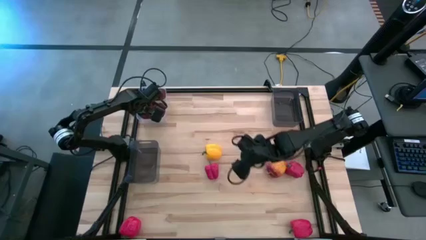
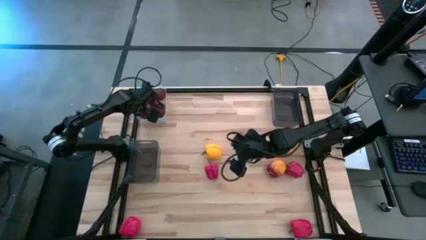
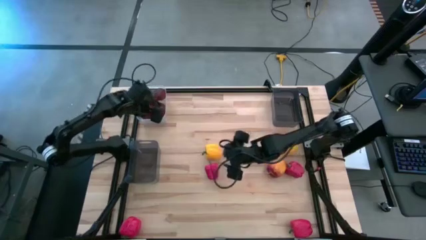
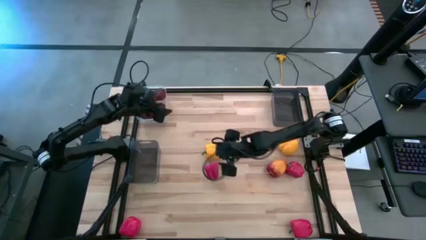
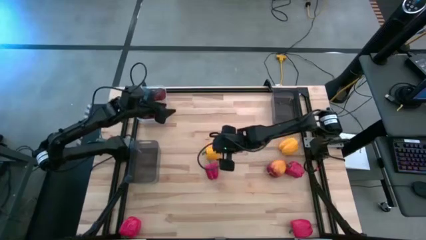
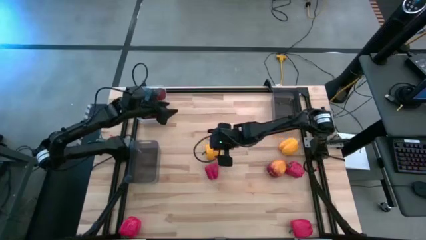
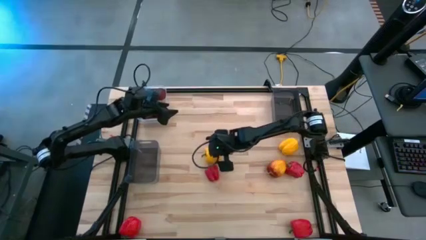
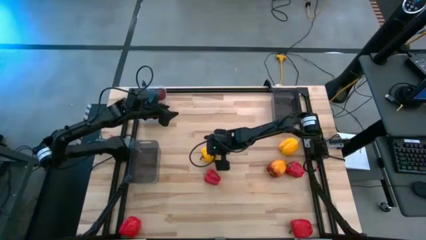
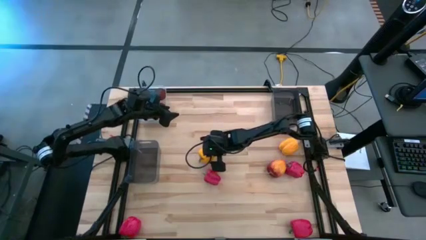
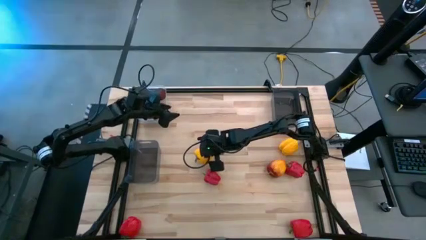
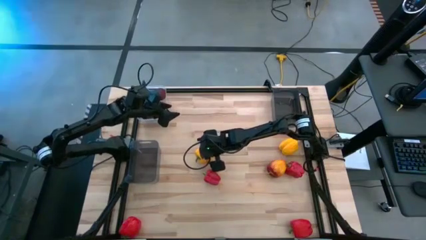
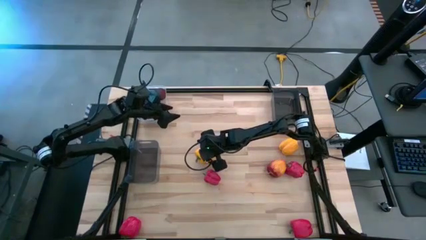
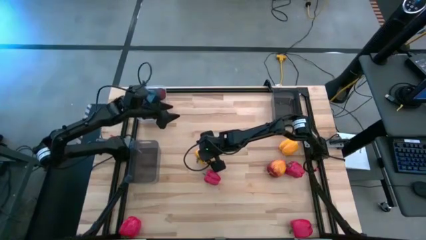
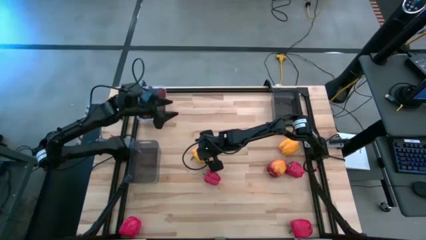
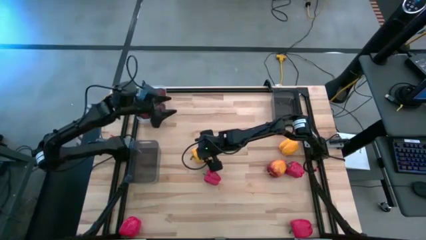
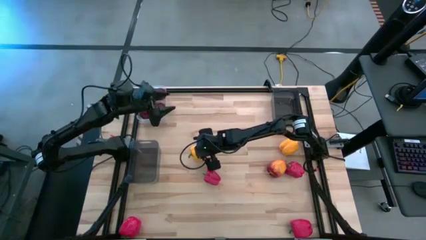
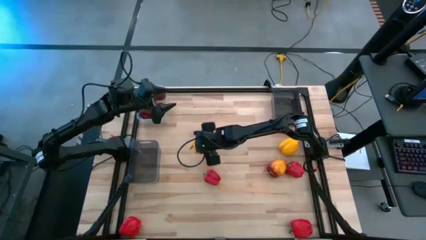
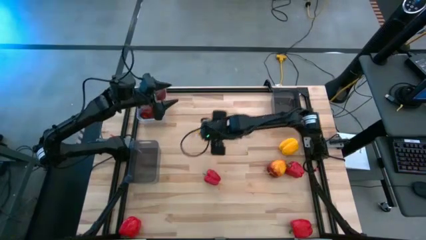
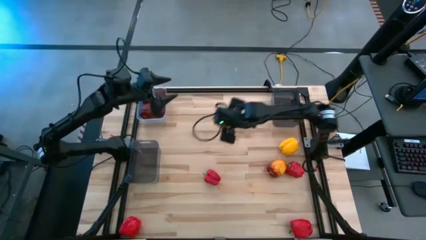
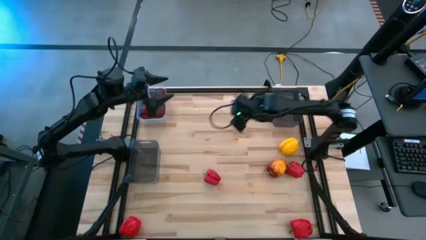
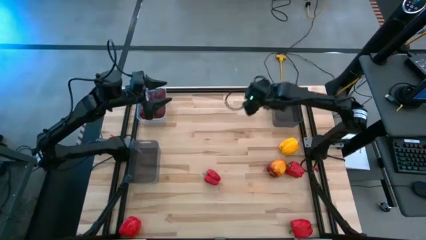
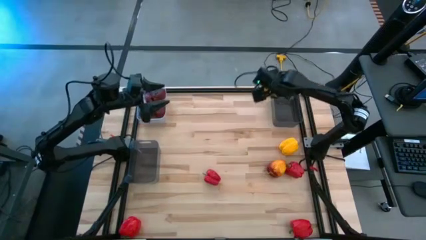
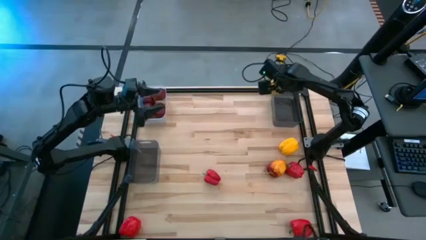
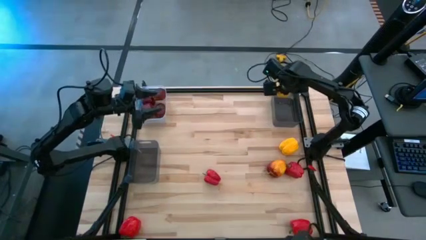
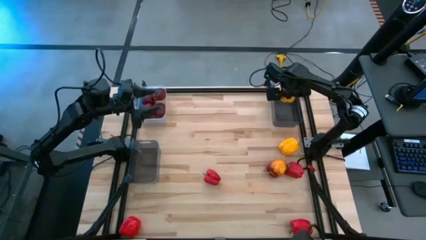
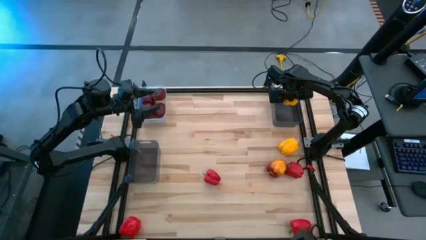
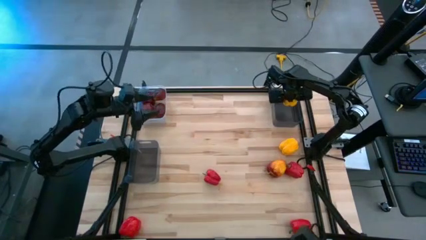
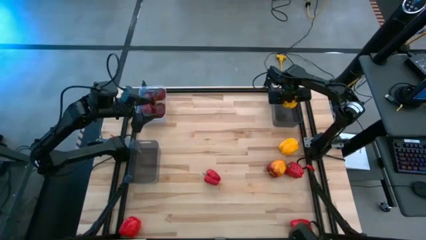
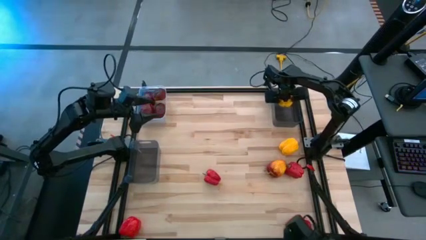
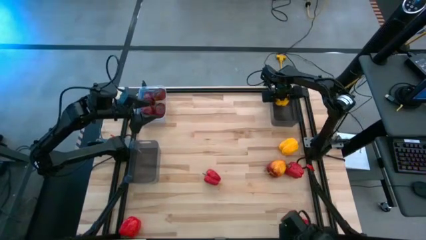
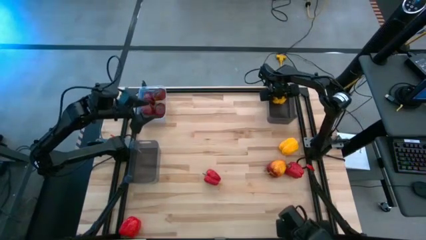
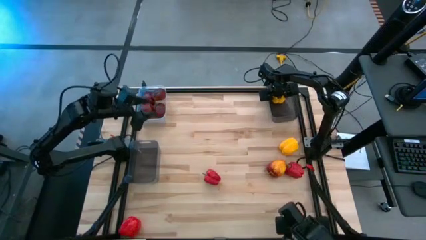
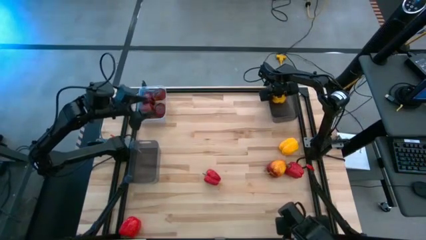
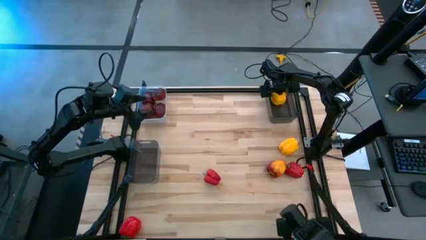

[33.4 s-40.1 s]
Task: Sort produce into baskets
Put the yellow bell pepper into the top black bin

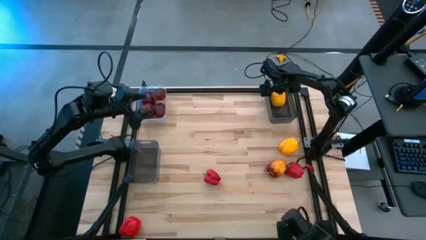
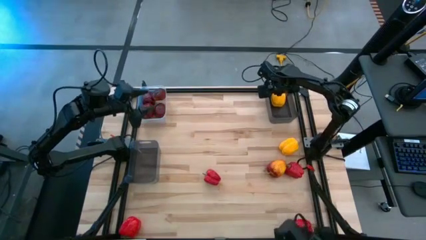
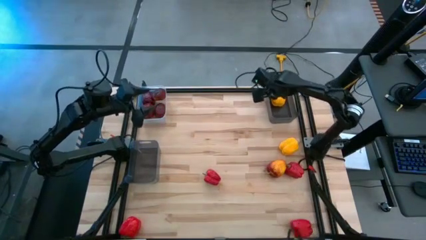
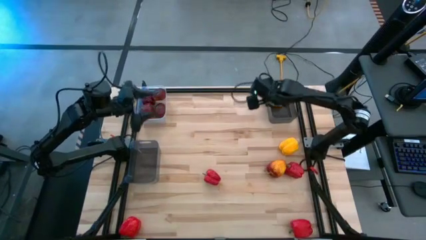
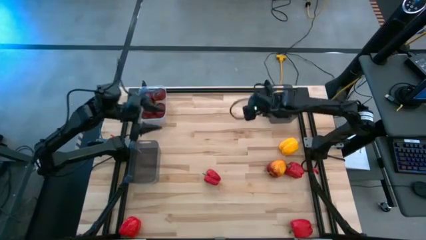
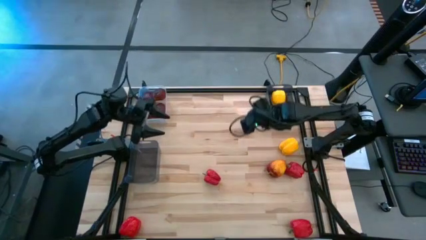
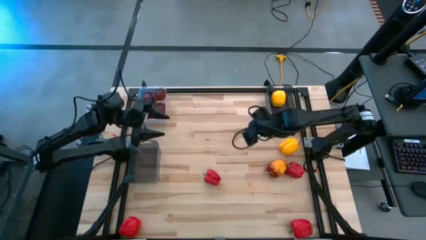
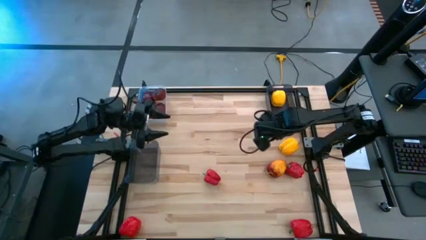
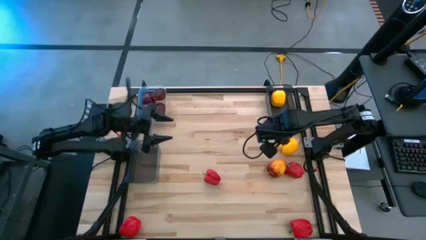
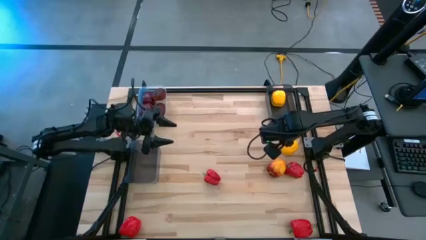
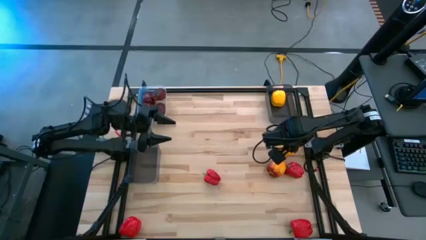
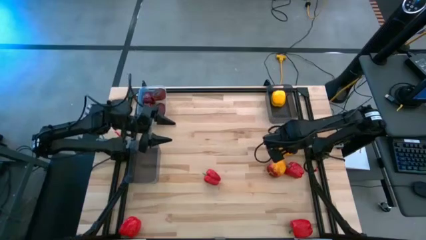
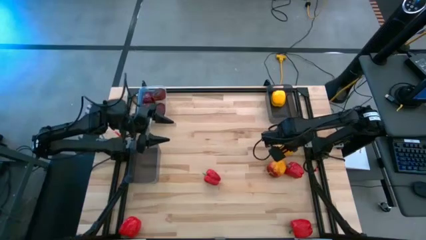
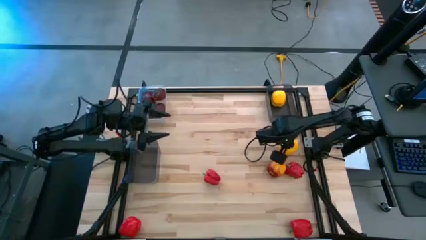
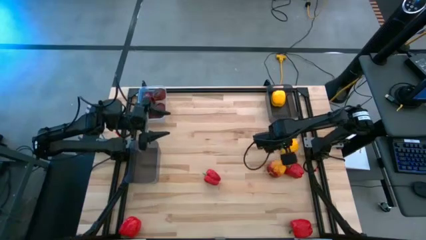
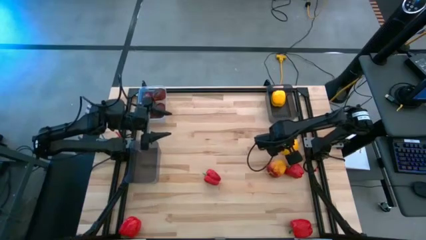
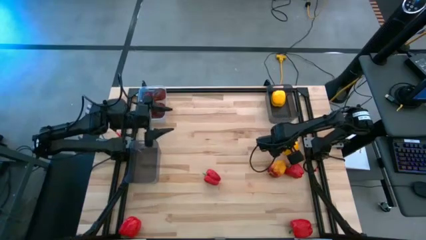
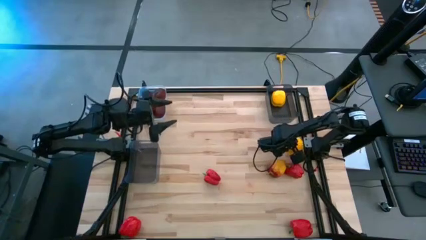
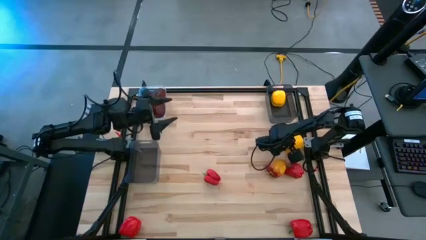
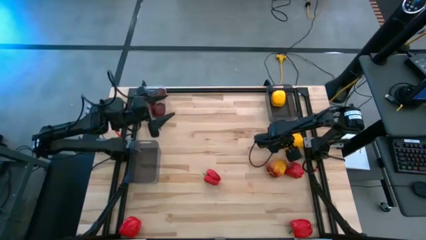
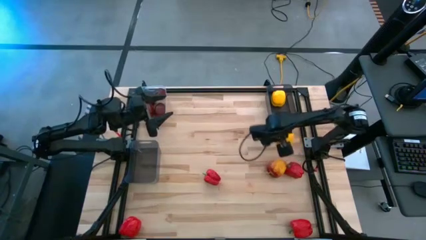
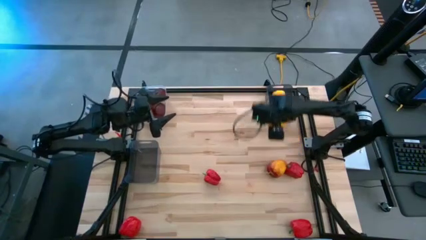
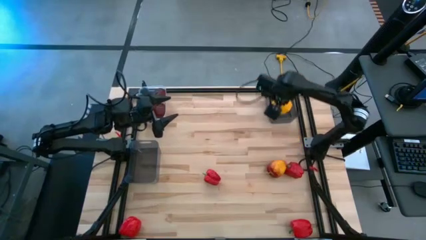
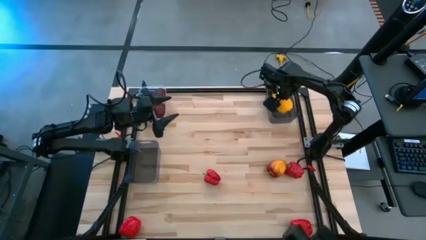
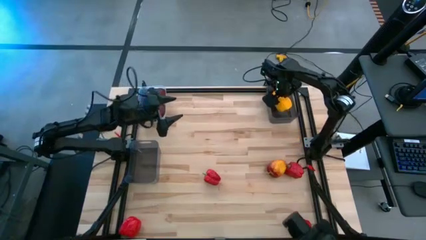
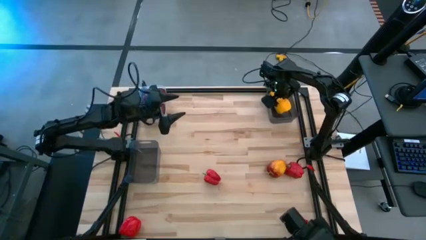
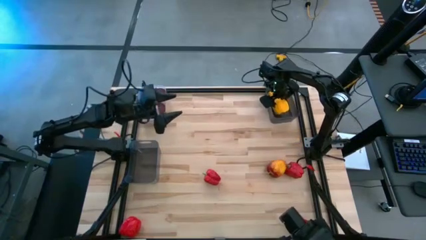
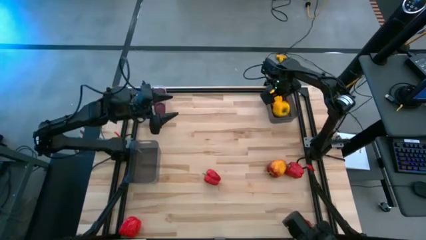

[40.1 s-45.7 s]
Put the yellow bell pepper into the top black bin

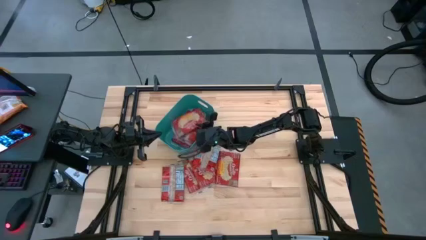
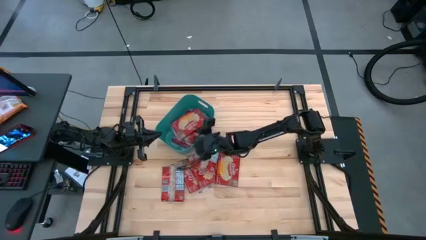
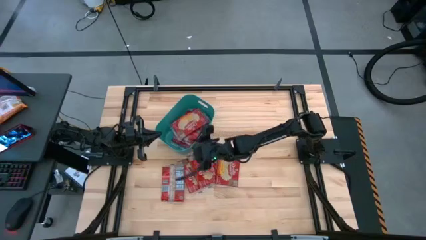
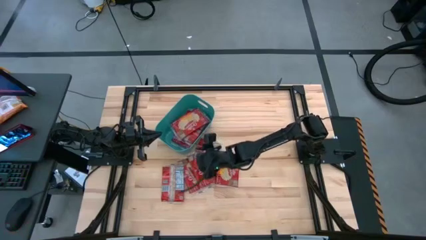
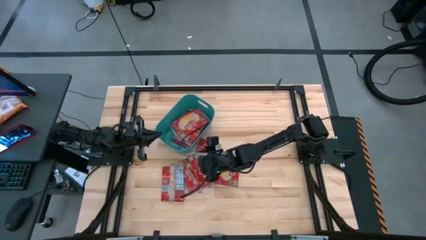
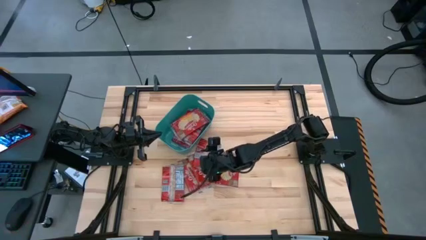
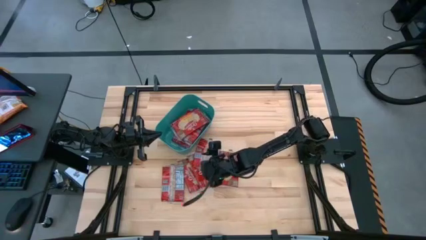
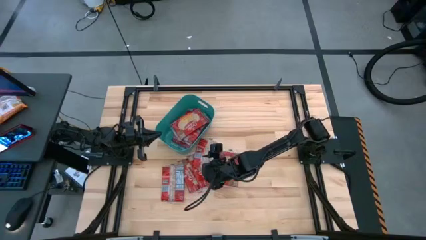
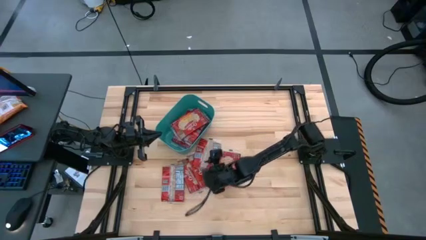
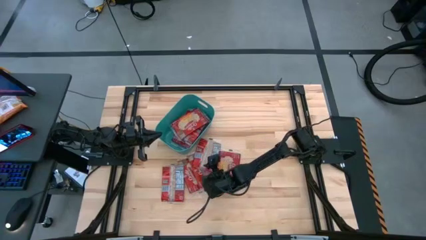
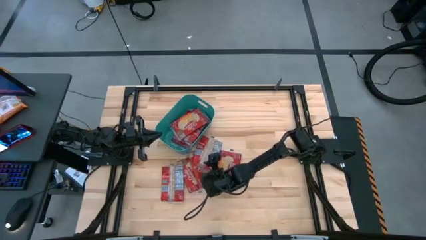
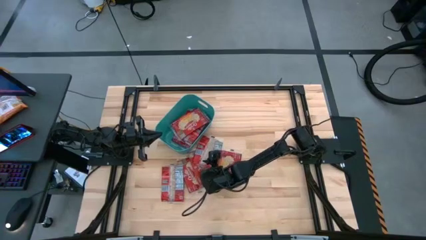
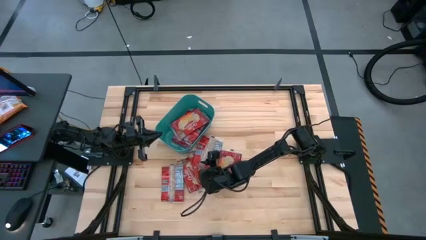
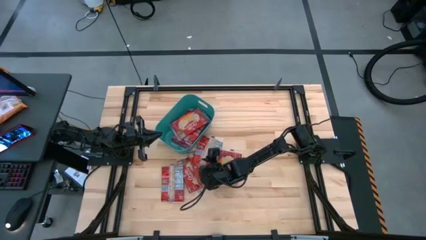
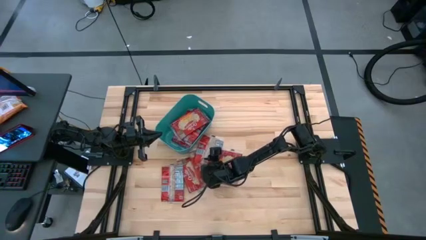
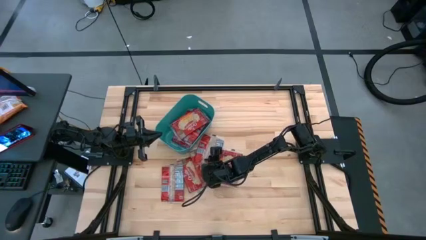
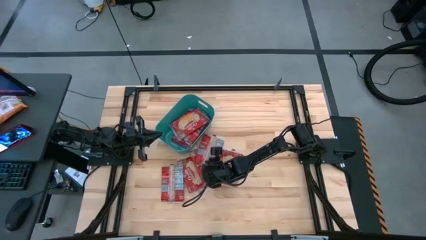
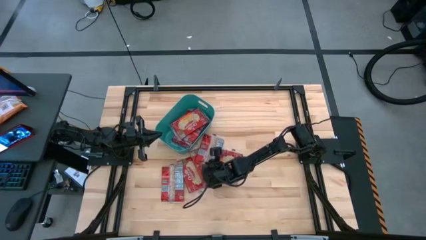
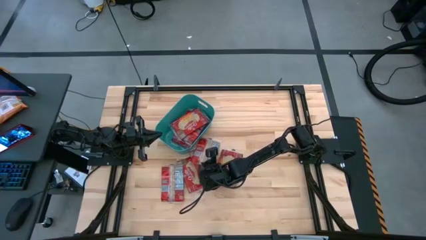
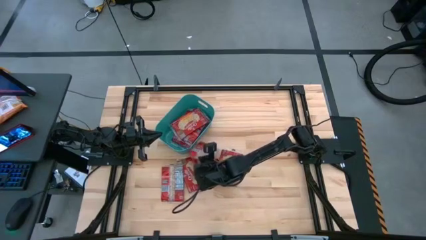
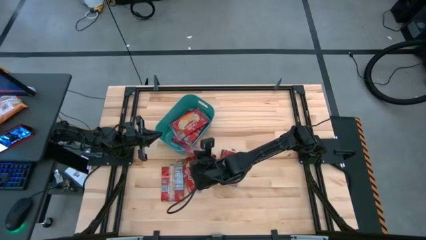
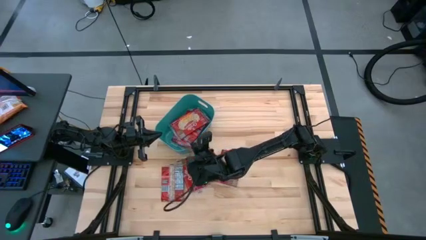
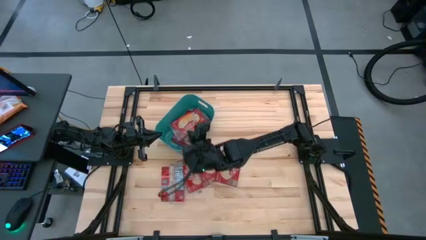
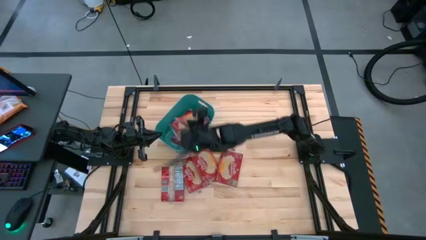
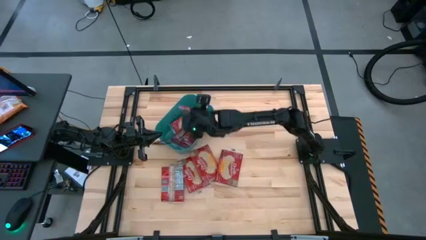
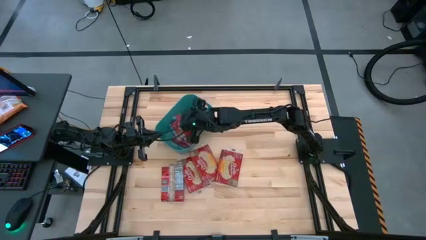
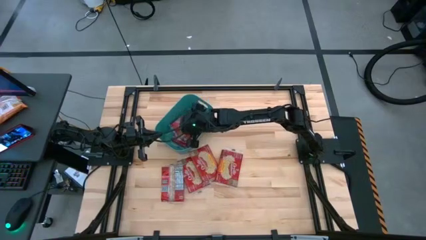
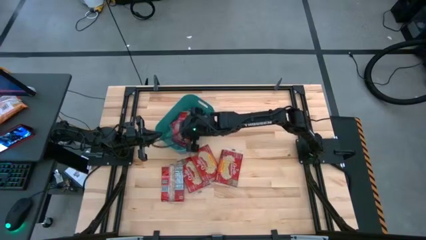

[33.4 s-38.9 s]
Task: Sort popcorn bags into baskets
Put the red popcorn bag into the blue bin
